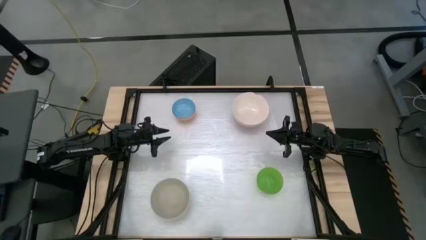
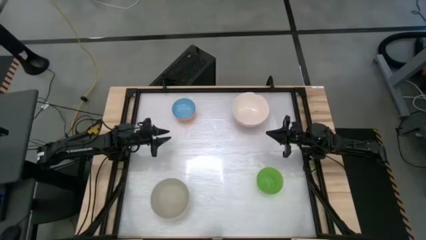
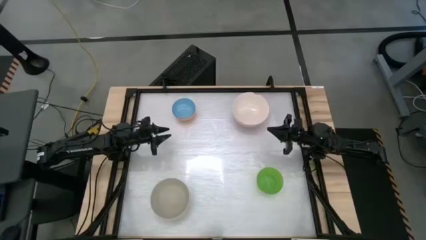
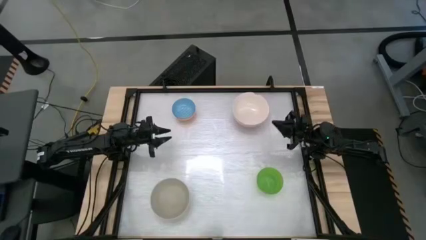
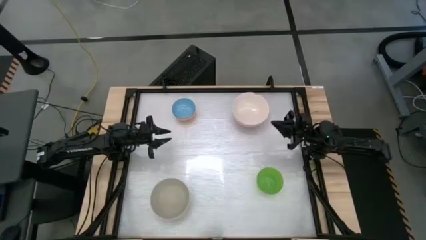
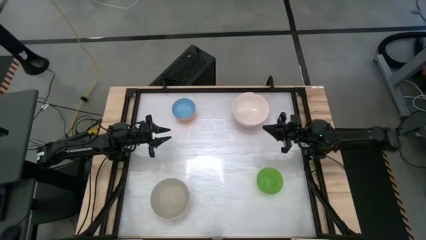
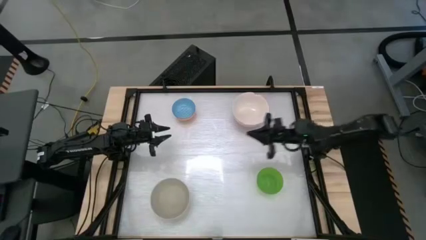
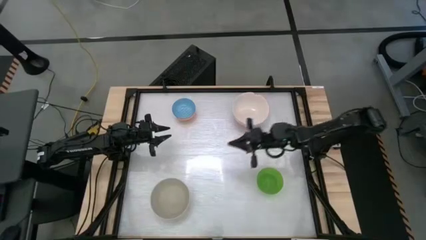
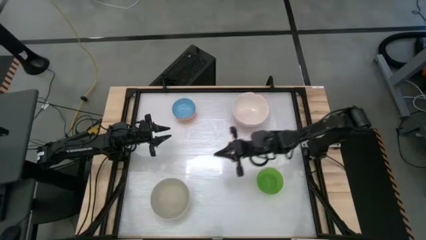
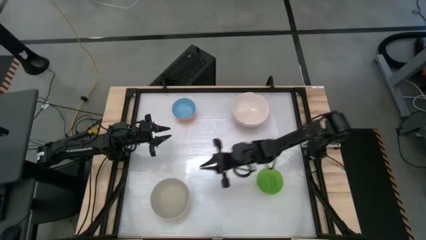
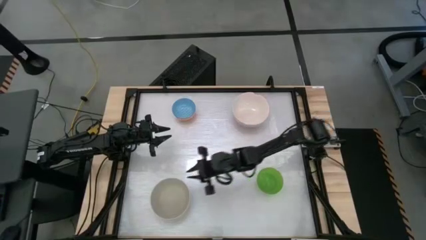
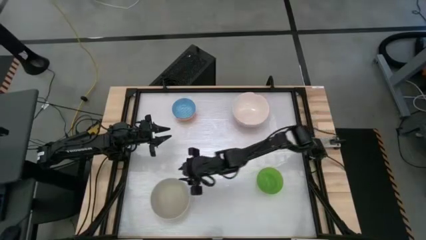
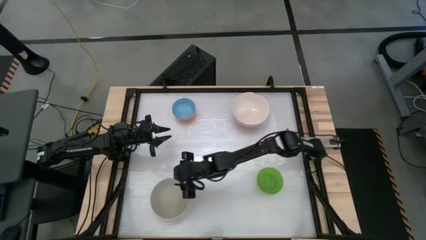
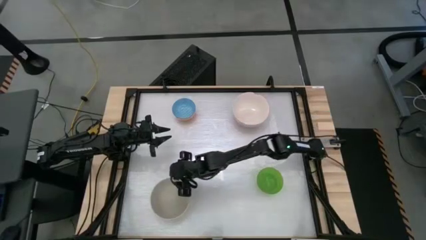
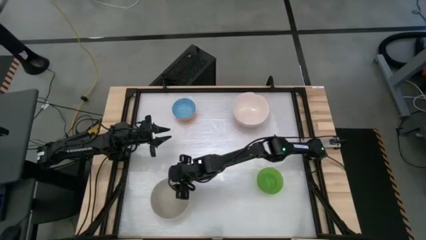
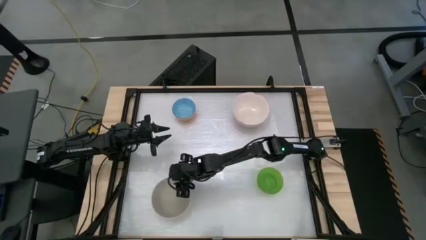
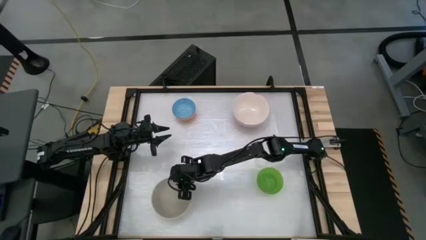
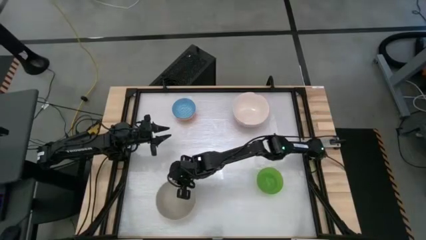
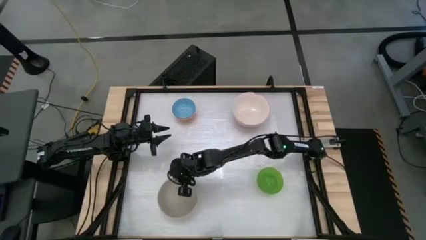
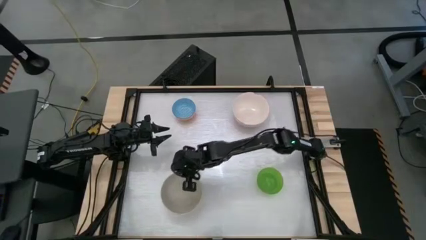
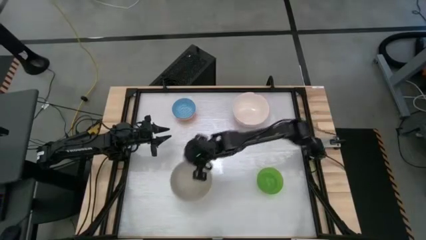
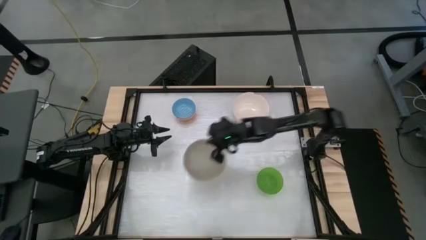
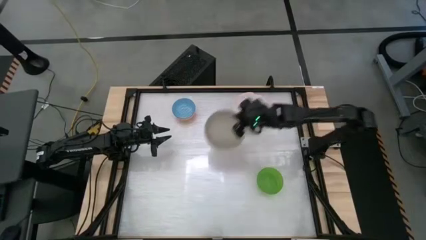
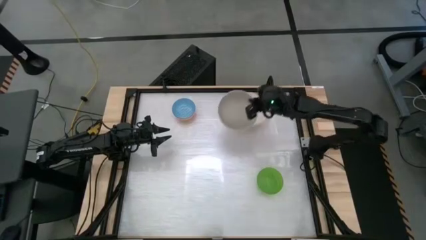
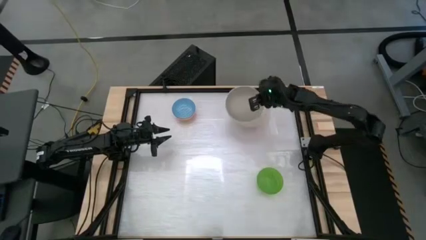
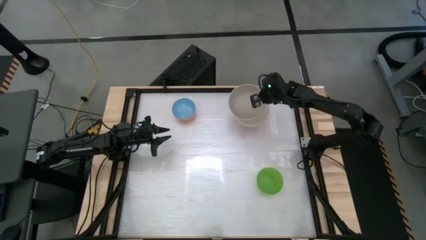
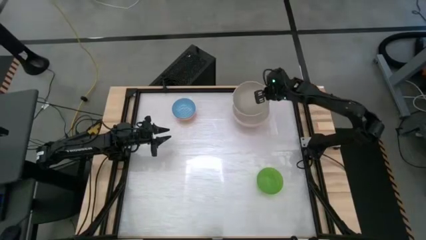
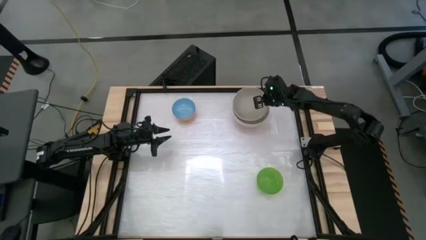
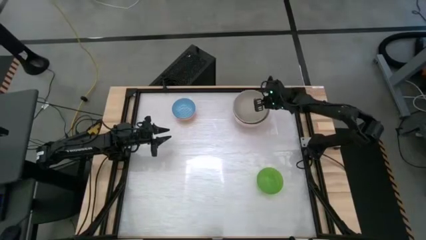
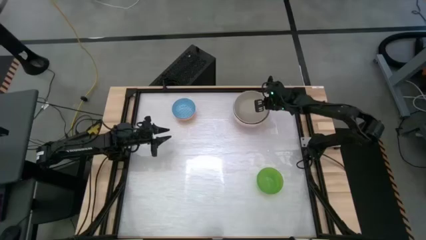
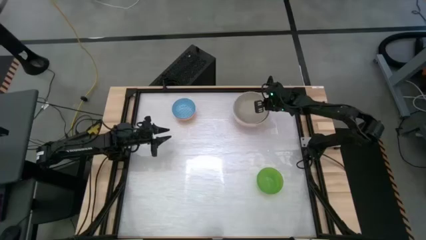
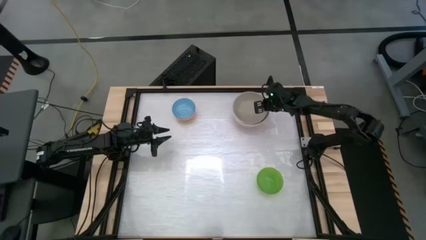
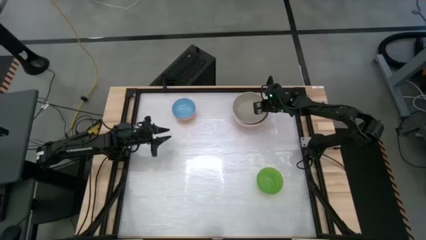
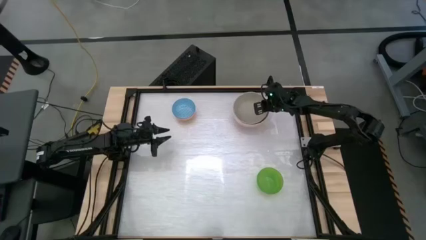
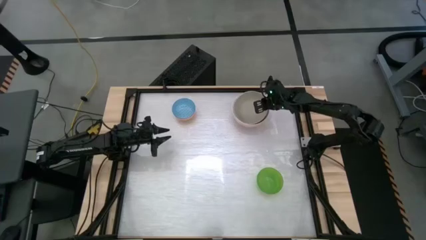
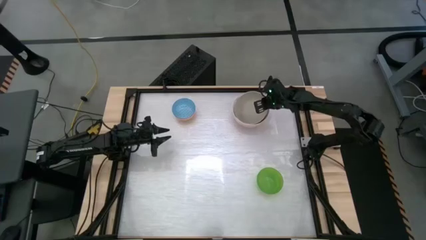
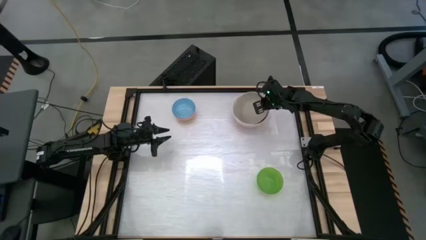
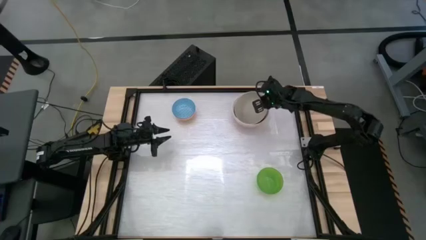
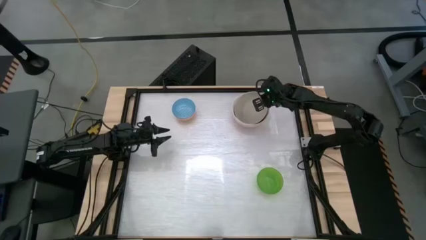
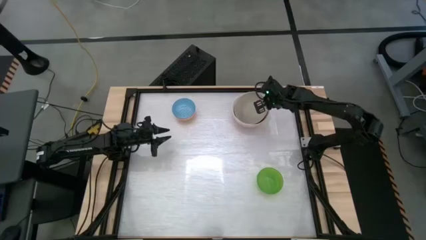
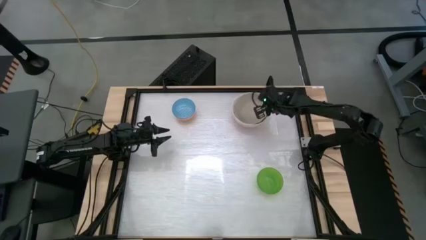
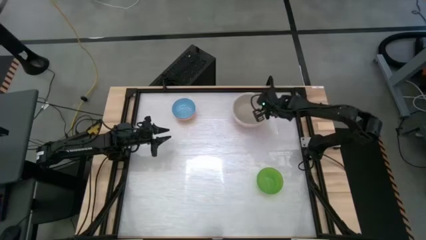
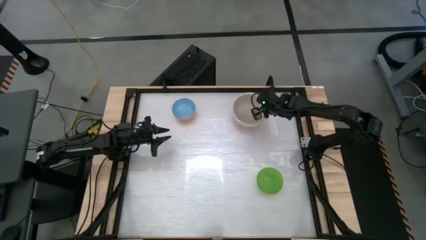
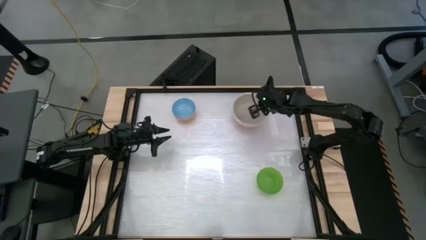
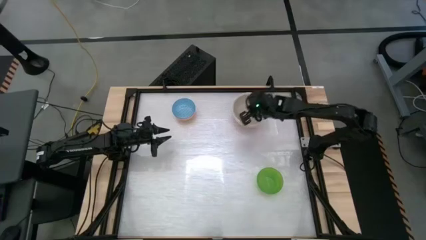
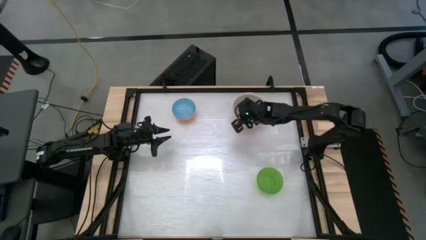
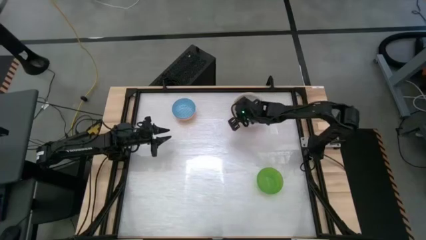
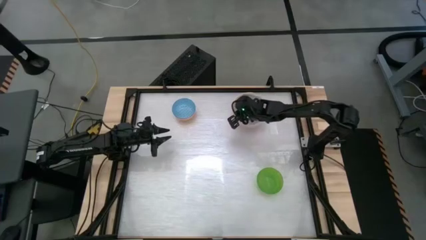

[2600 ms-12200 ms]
Stack the gray bowl on the white bowl

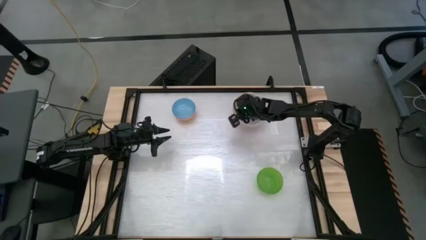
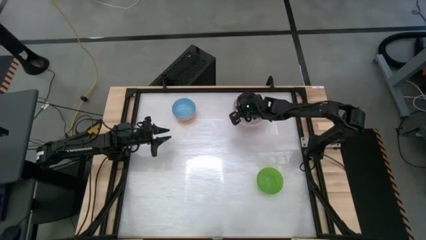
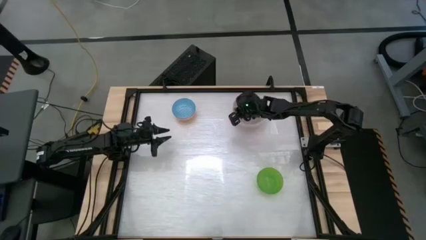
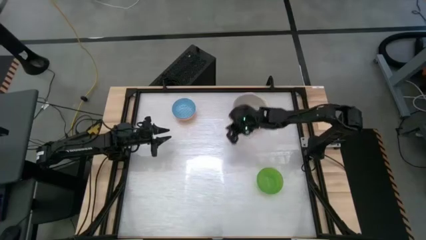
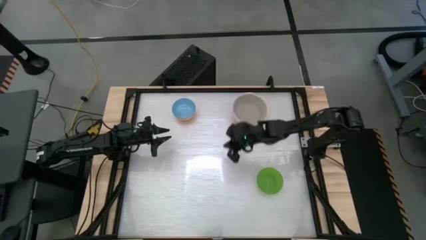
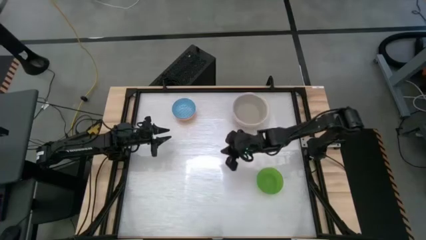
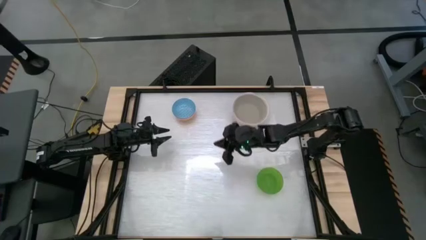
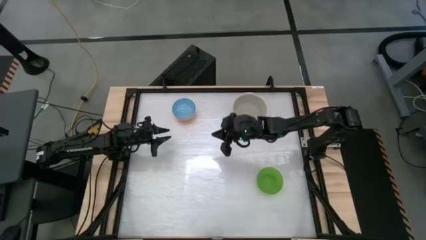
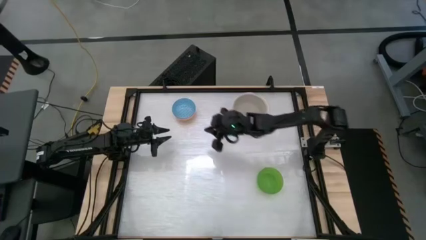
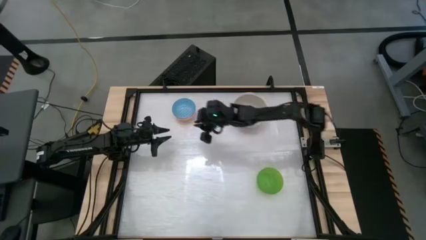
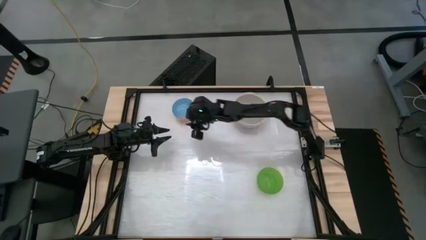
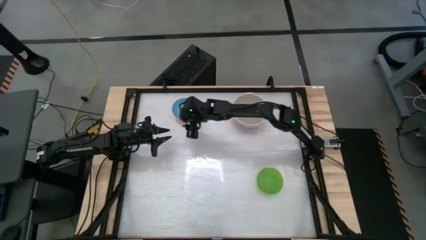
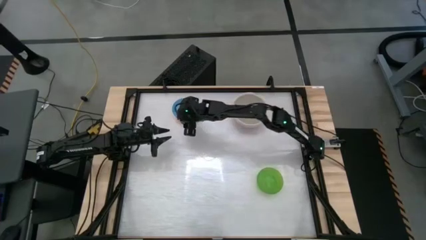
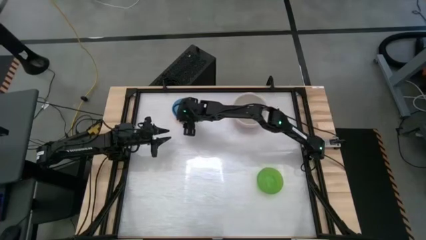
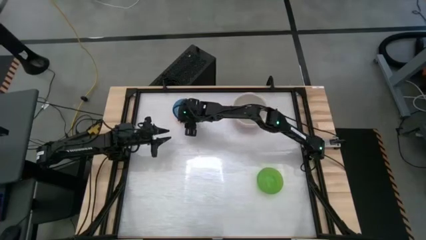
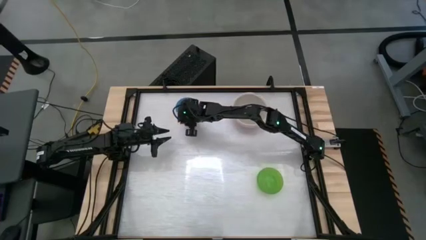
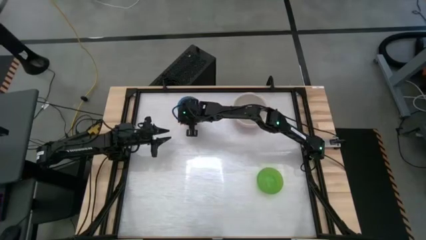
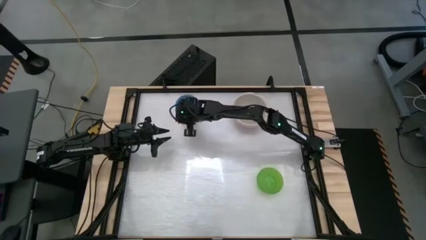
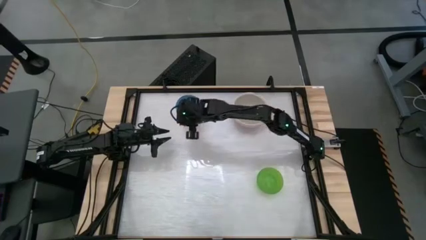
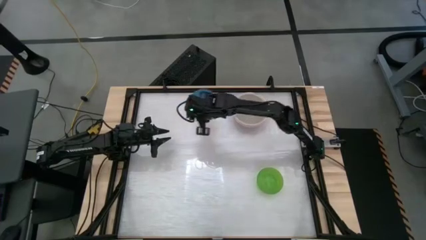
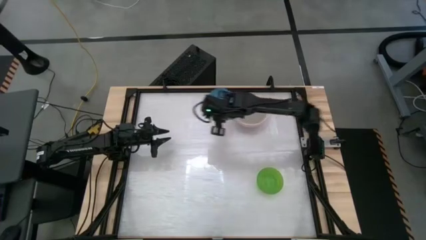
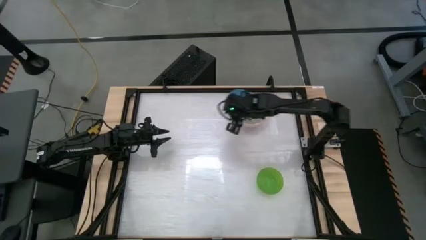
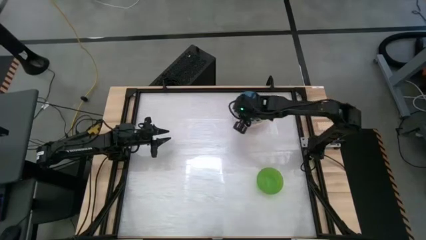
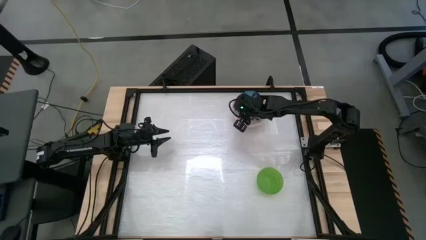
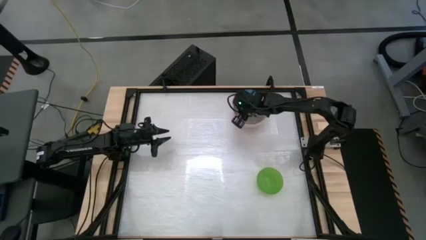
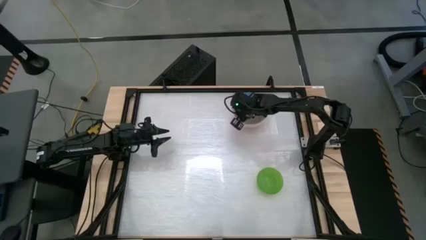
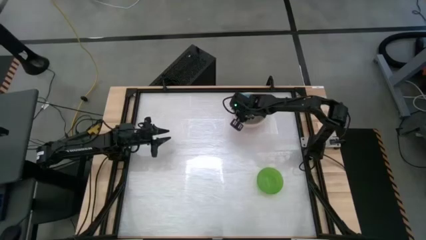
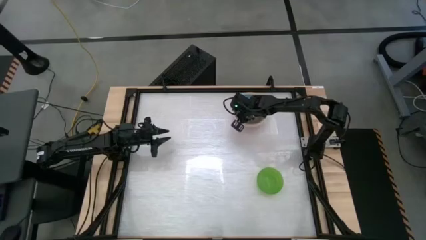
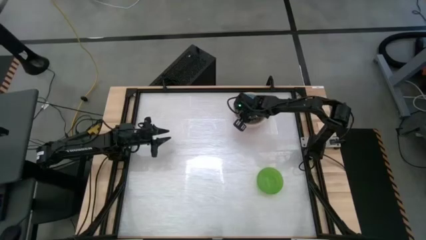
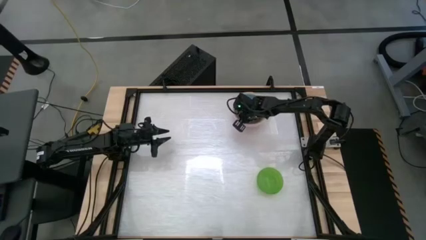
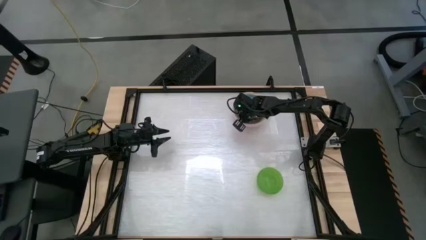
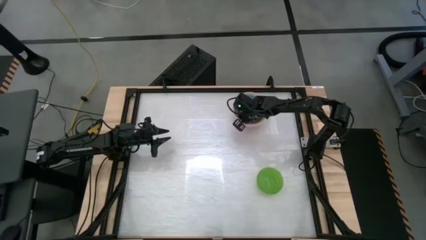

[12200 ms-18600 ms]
Stack the blue bowl on the gray bowl
